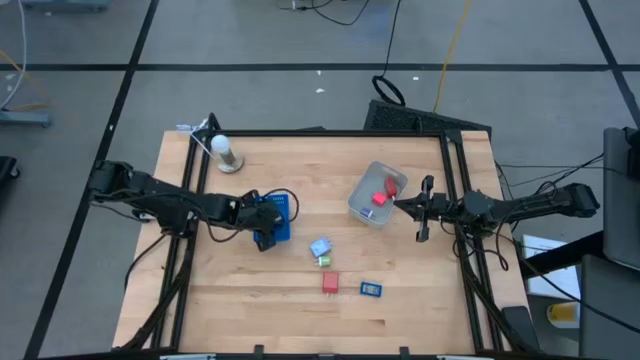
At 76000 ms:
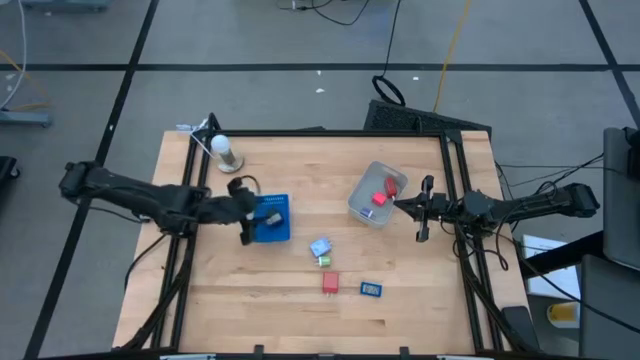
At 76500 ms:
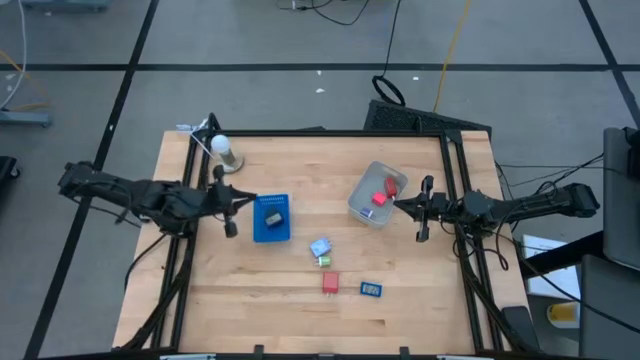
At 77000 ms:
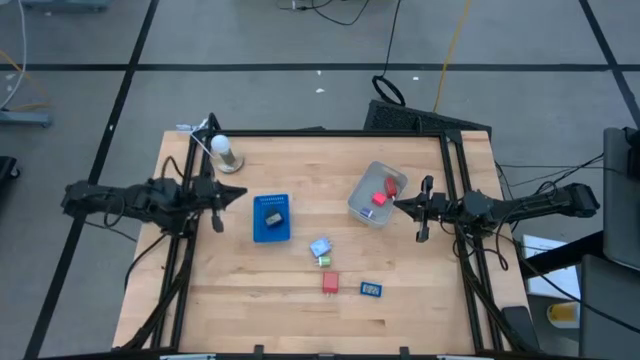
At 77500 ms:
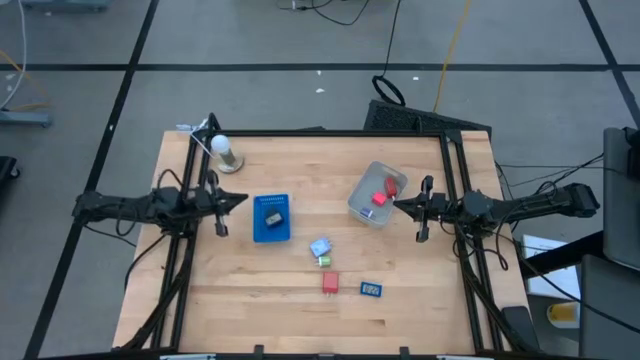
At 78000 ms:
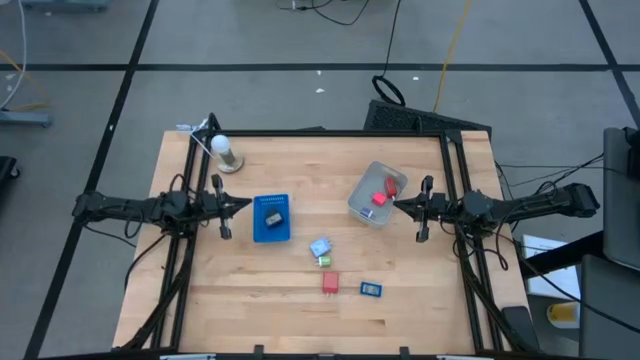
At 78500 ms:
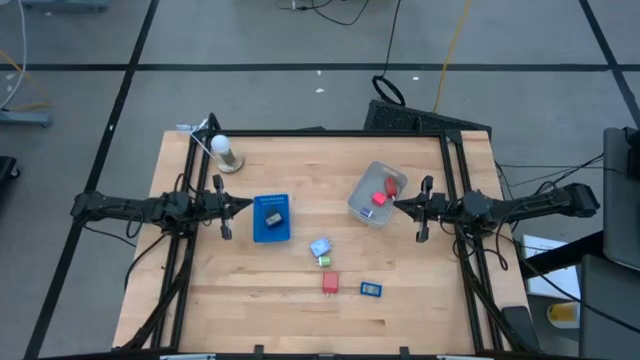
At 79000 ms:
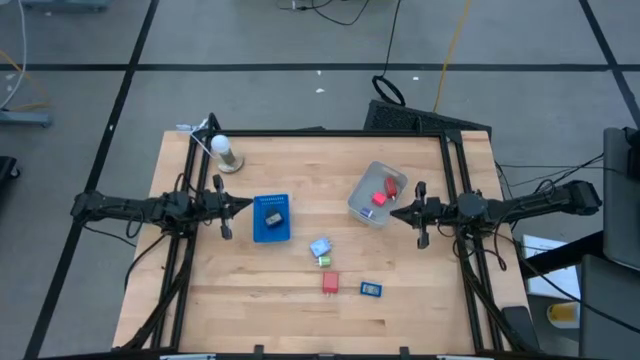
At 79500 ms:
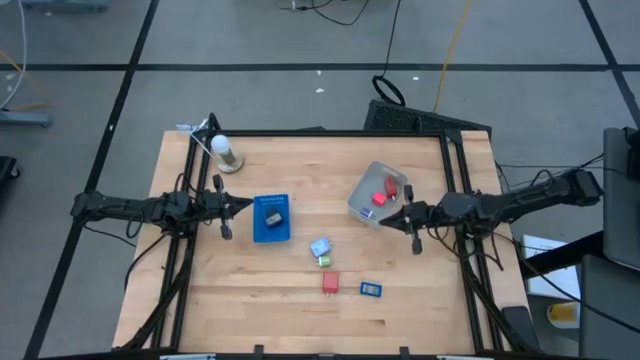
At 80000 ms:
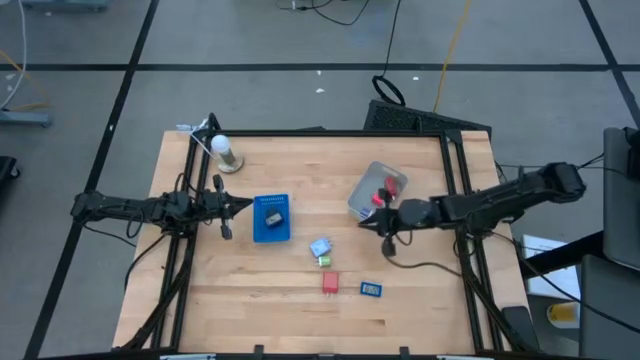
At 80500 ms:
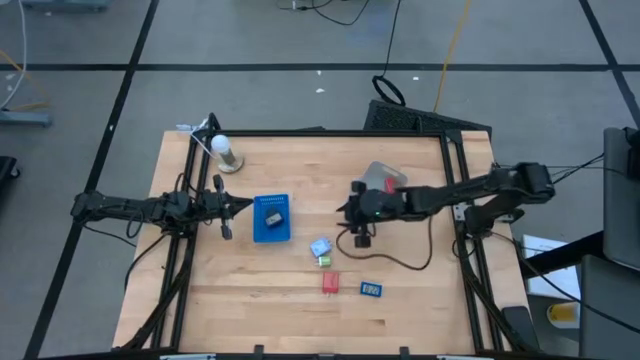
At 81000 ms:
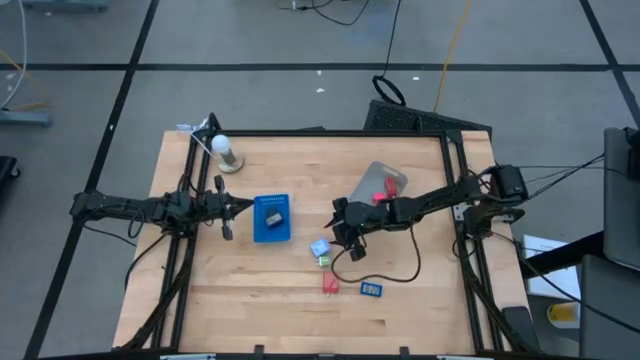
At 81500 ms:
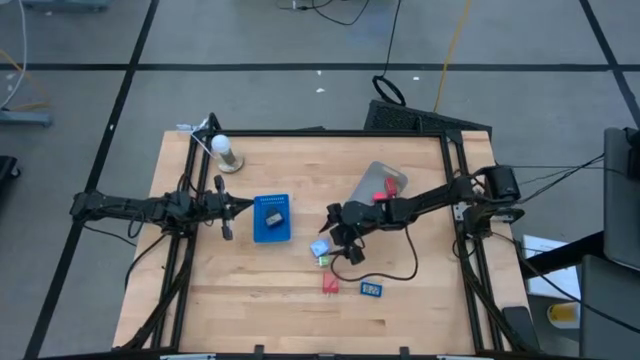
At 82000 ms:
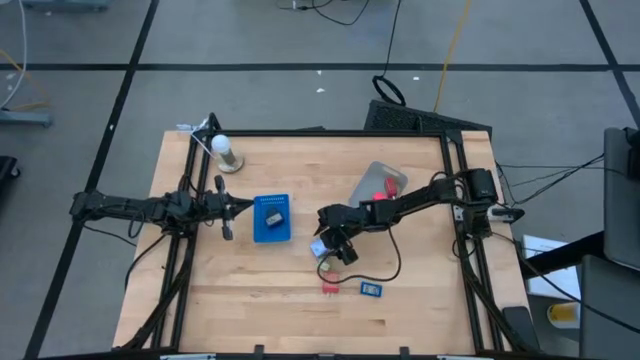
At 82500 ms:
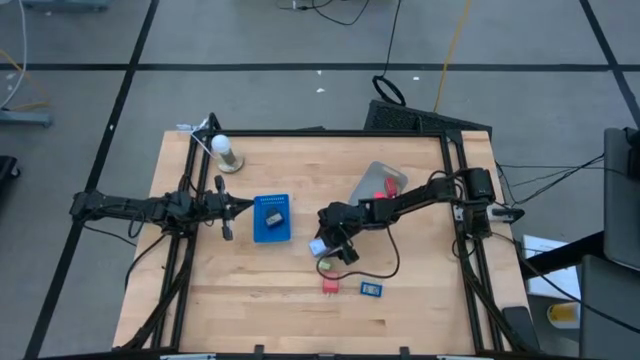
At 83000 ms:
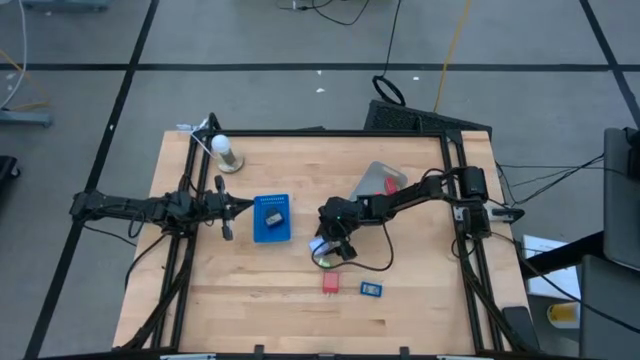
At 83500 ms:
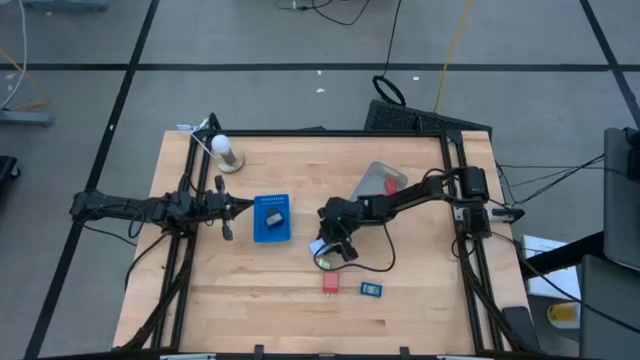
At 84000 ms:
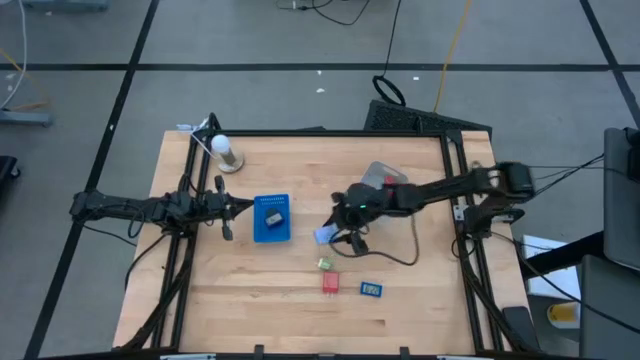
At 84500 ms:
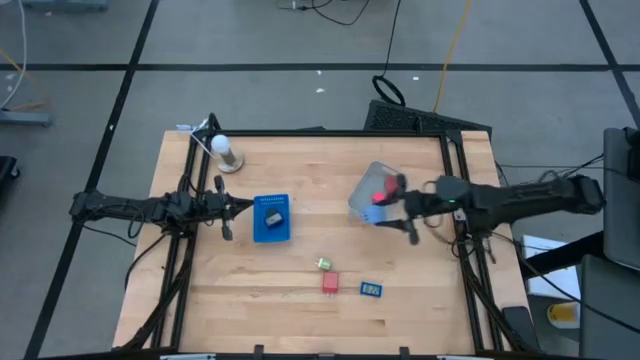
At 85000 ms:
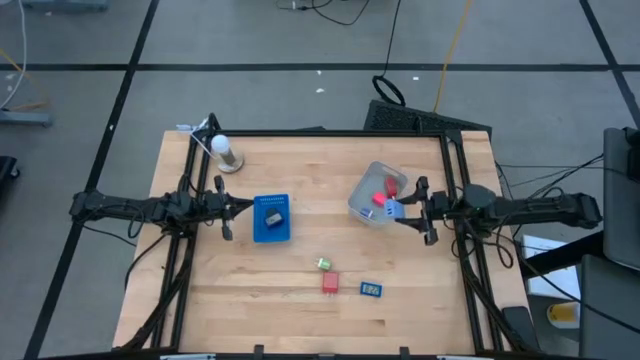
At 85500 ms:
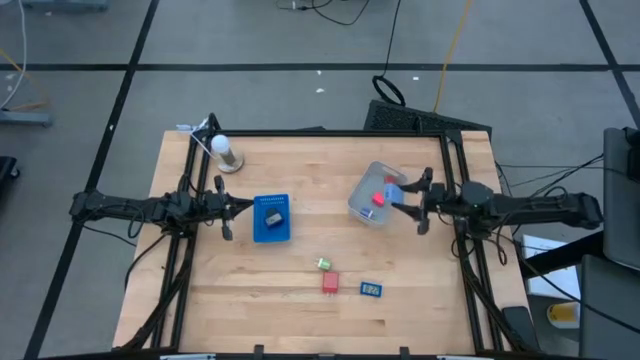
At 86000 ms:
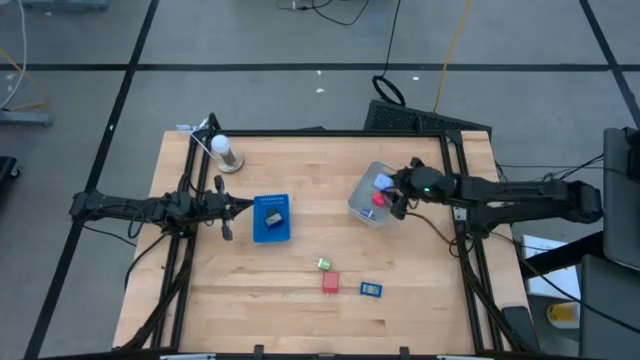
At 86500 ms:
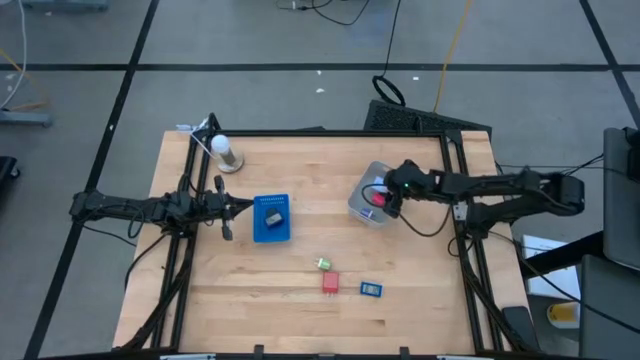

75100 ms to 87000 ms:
Task: Pick & Place Office items
Put the light blue charger adapter into the gray bin

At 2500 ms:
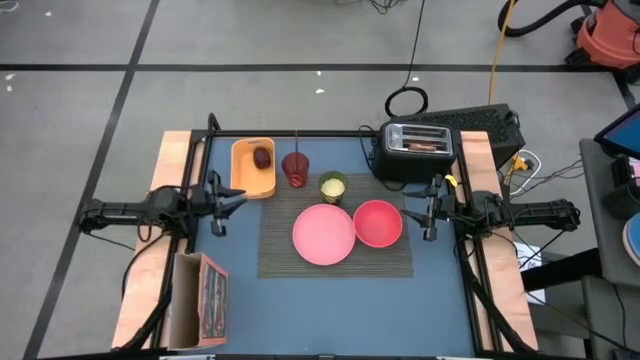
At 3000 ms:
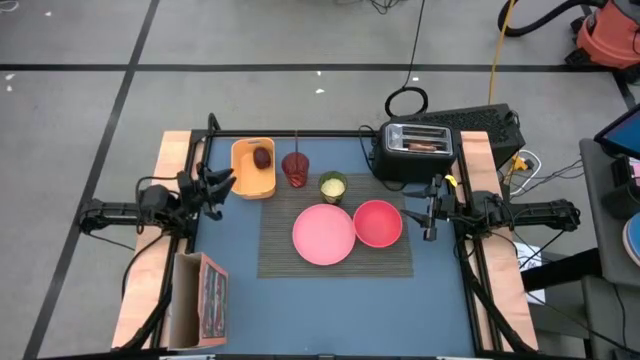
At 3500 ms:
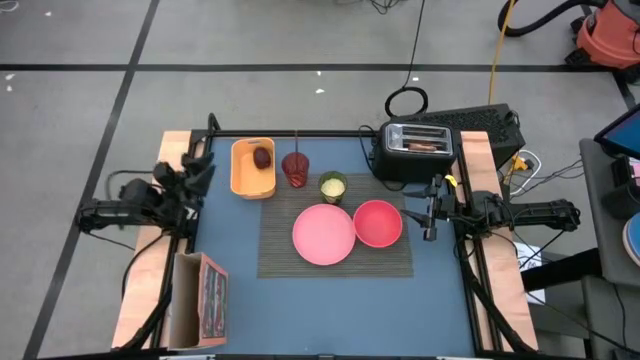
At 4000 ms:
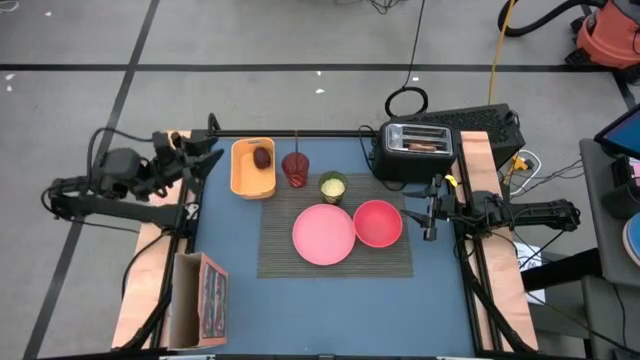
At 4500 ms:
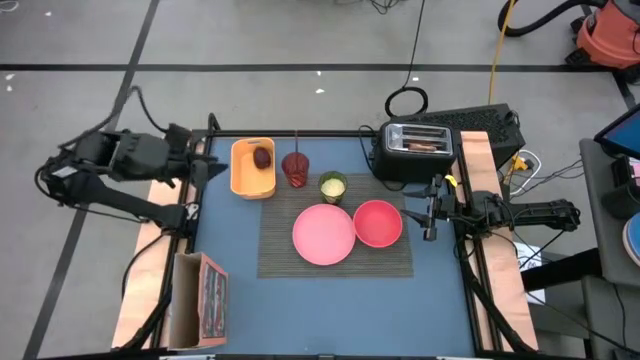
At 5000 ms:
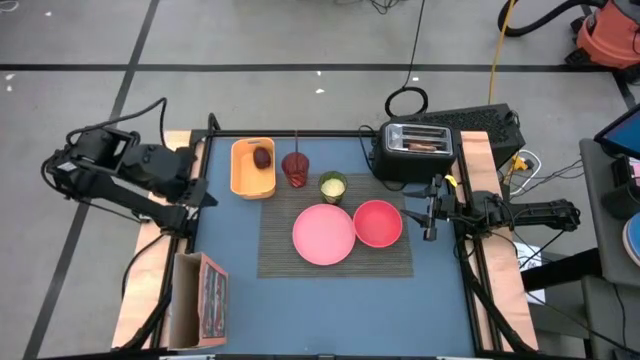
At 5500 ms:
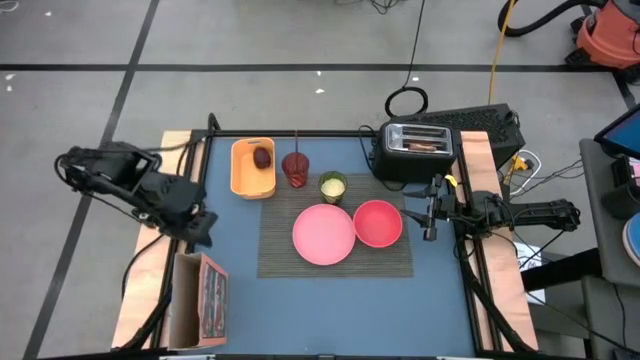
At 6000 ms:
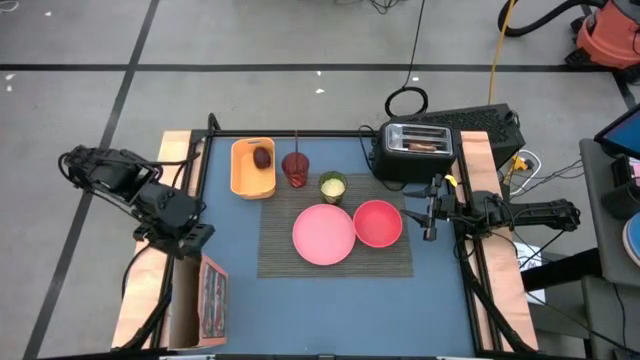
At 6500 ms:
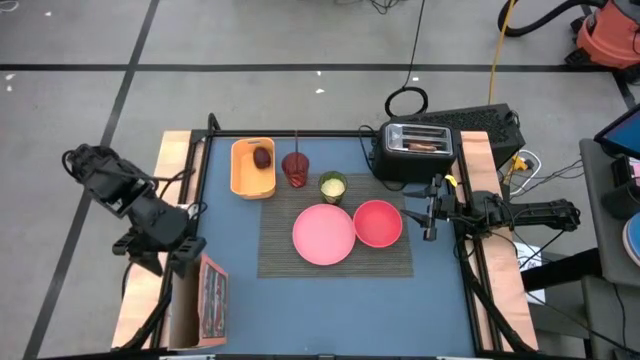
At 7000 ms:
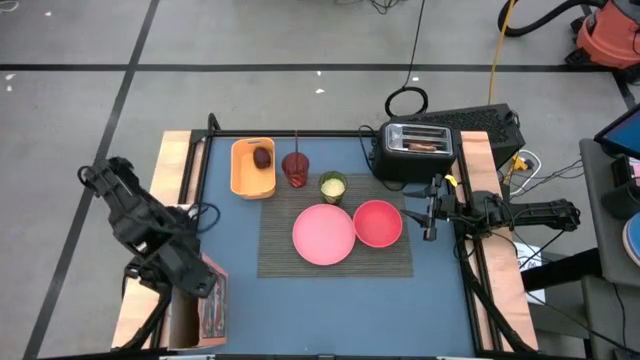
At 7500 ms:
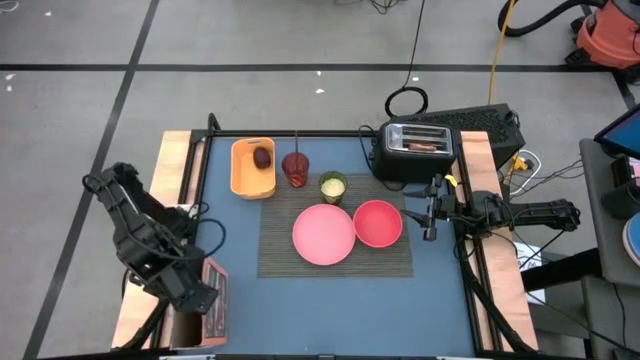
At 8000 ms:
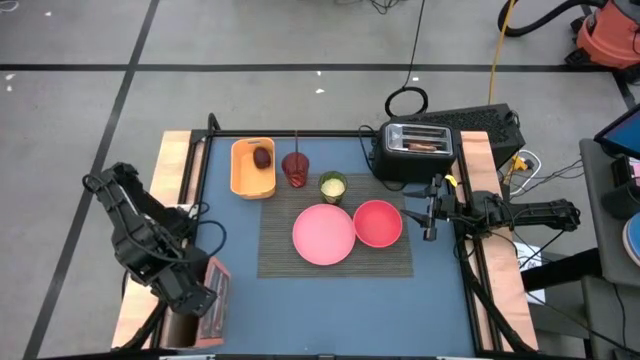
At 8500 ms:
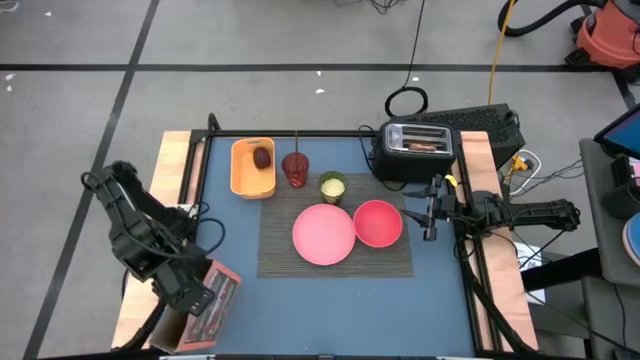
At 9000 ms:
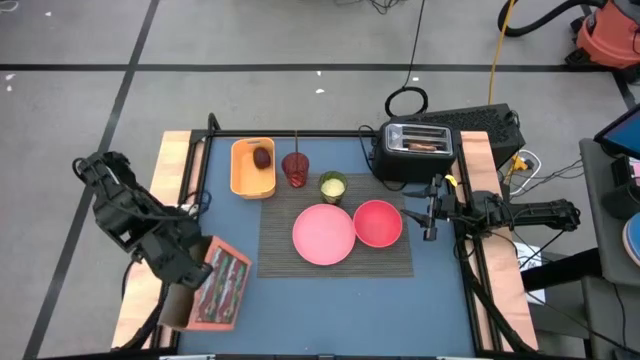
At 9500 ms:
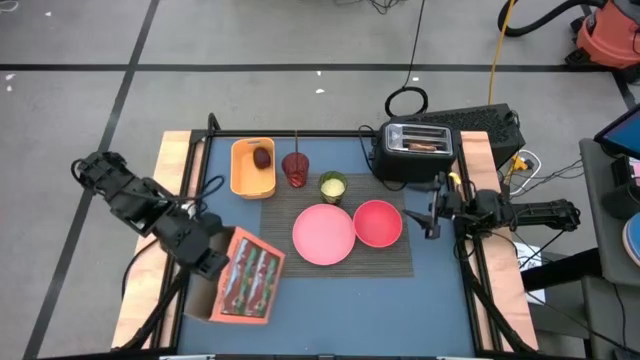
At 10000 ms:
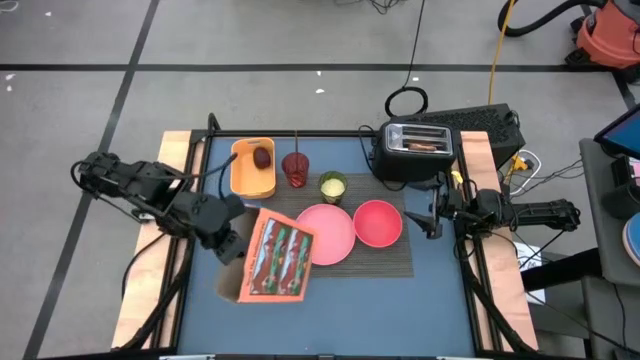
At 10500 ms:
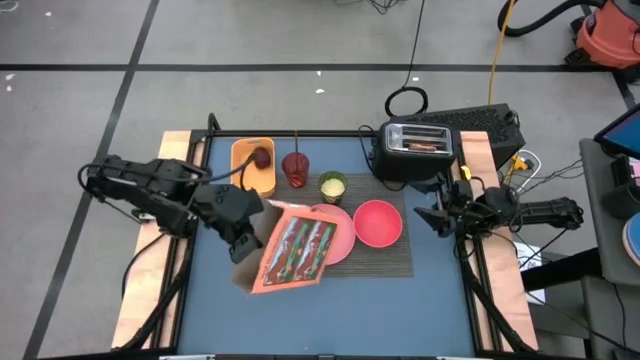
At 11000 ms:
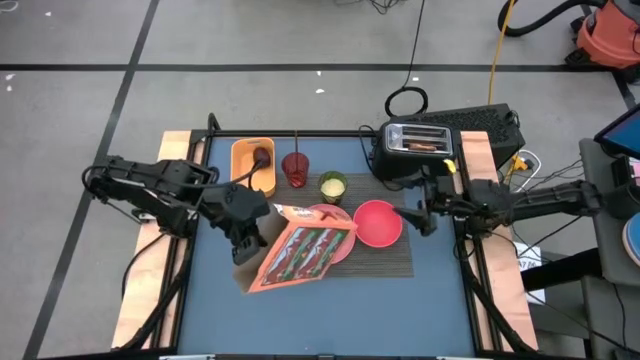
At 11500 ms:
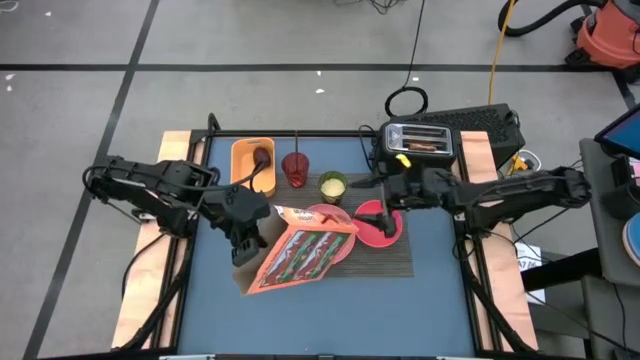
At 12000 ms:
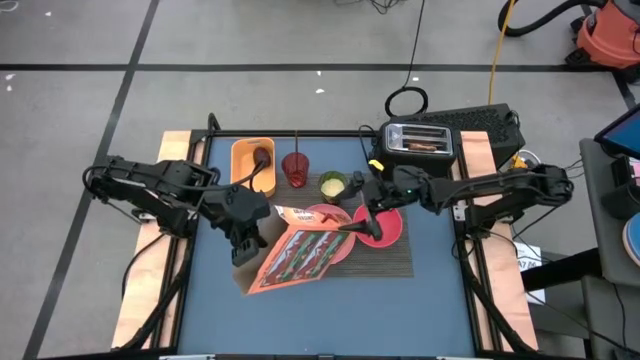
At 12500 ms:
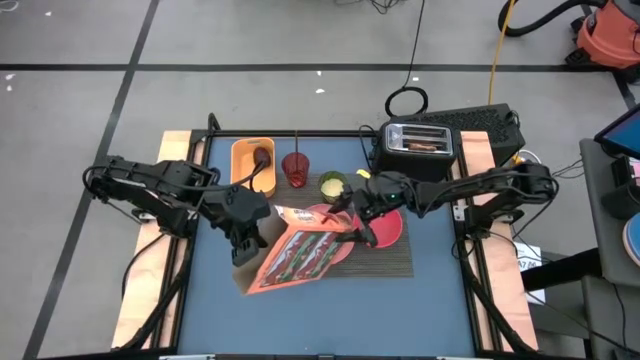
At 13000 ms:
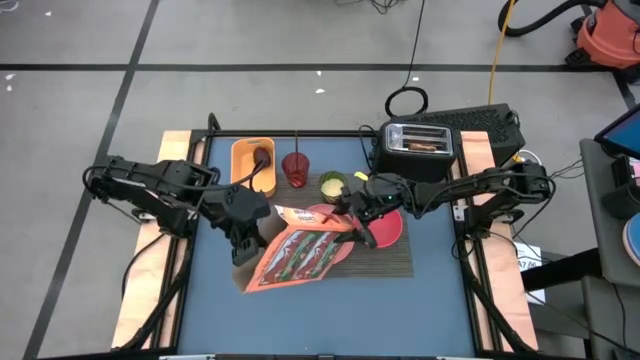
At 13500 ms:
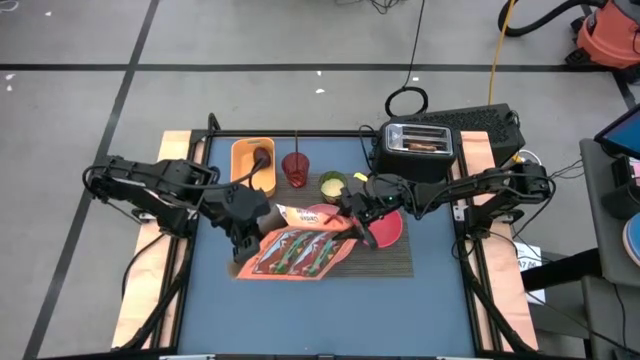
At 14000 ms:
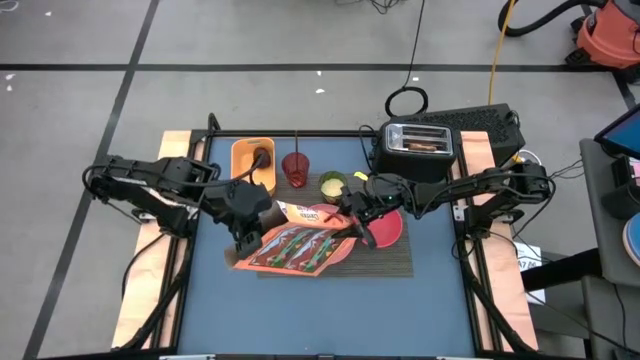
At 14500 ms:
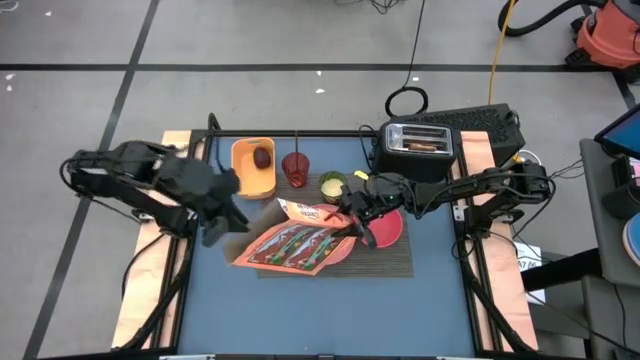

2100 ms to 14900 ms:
Task: Arrange a breakfast setting
Pour the cereal from the cereal box into the pink bowl
